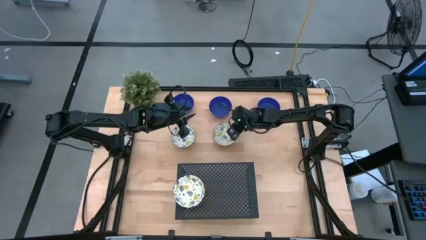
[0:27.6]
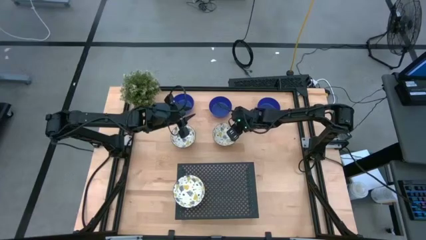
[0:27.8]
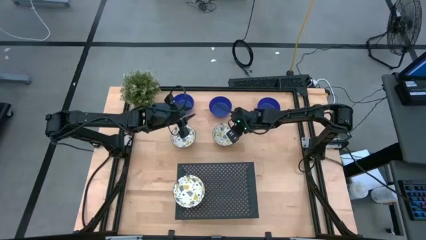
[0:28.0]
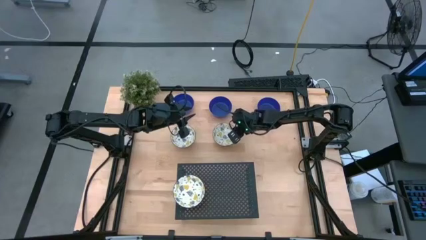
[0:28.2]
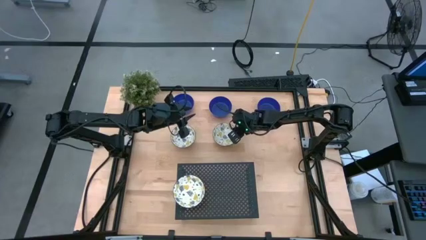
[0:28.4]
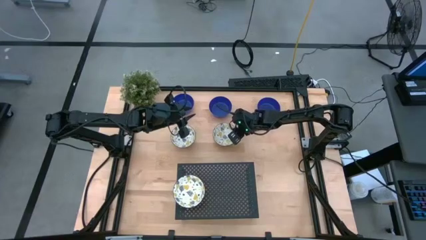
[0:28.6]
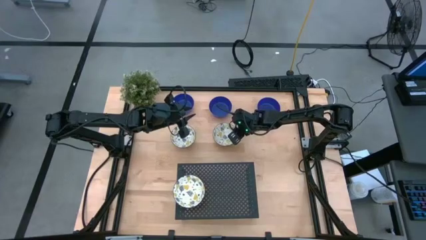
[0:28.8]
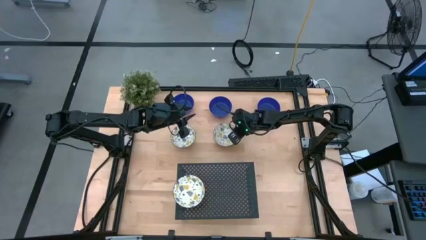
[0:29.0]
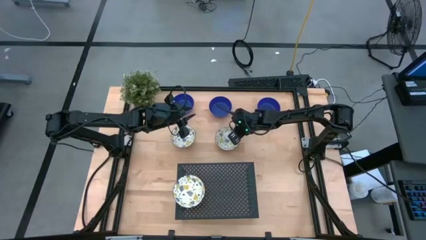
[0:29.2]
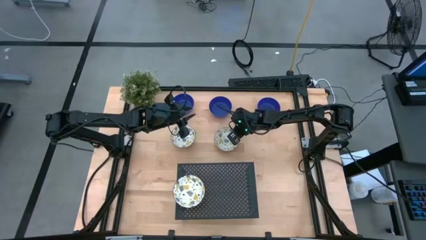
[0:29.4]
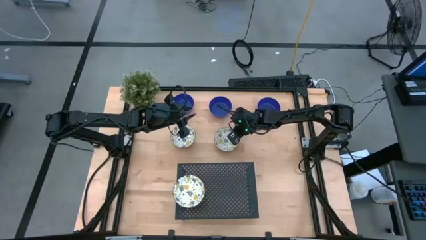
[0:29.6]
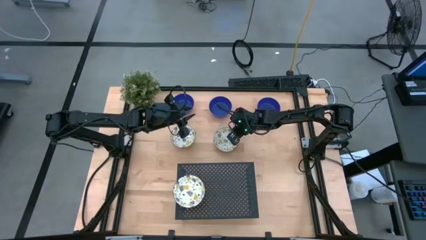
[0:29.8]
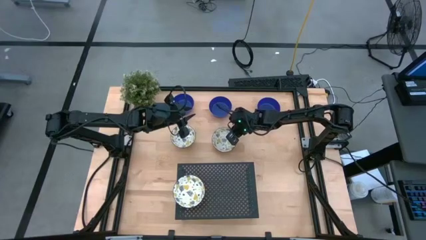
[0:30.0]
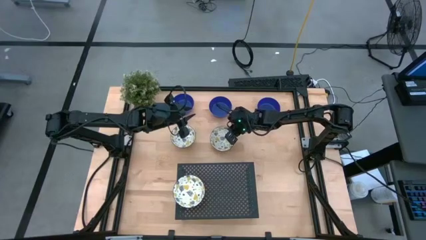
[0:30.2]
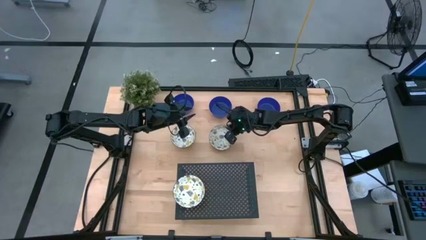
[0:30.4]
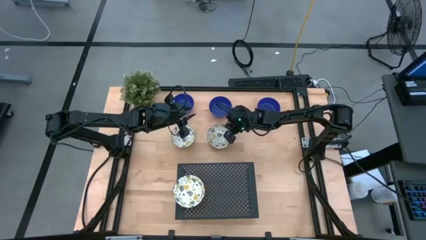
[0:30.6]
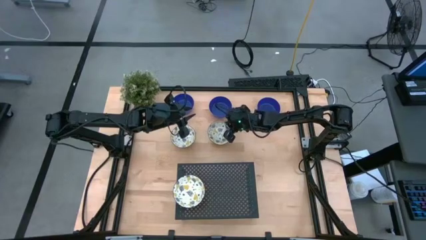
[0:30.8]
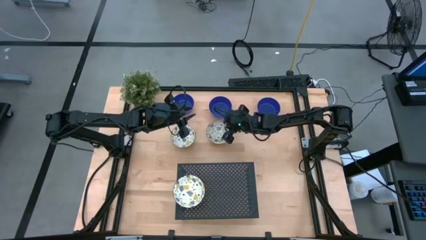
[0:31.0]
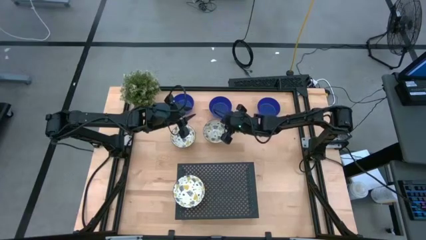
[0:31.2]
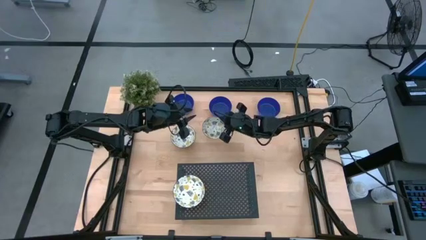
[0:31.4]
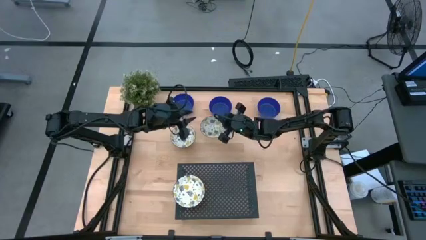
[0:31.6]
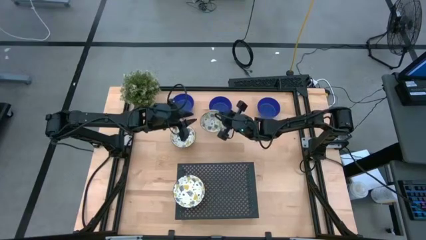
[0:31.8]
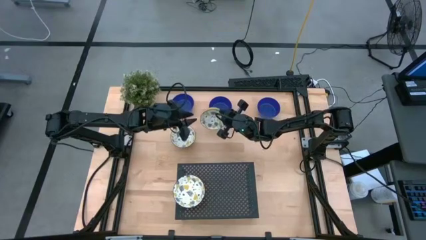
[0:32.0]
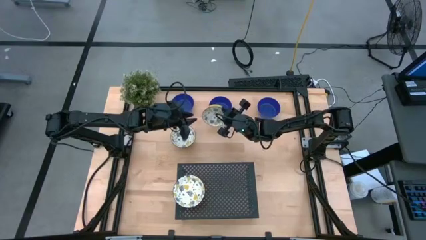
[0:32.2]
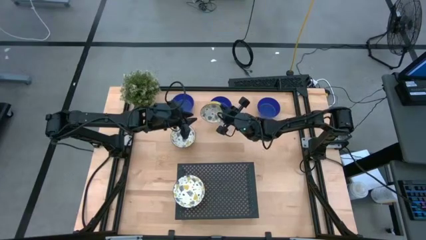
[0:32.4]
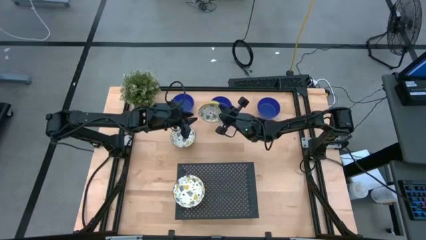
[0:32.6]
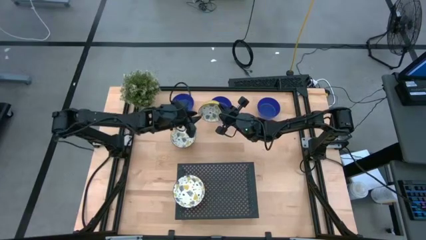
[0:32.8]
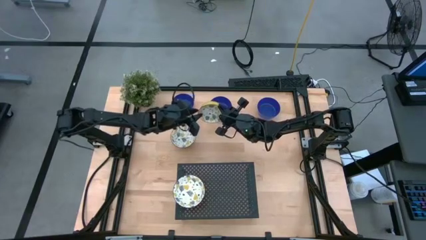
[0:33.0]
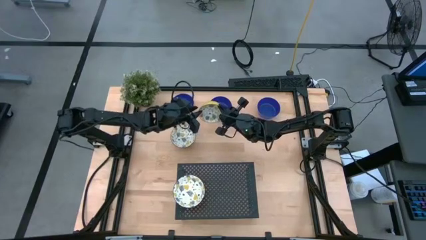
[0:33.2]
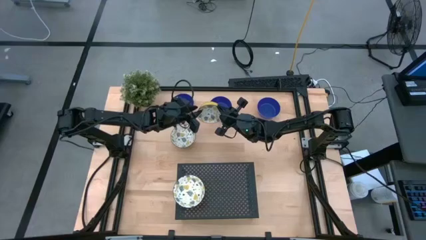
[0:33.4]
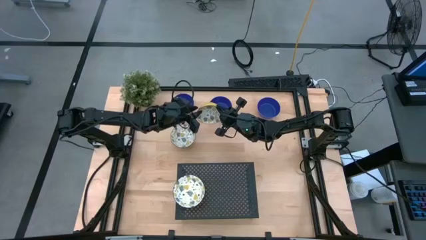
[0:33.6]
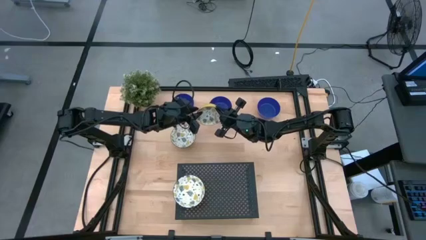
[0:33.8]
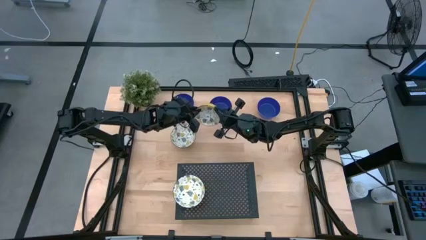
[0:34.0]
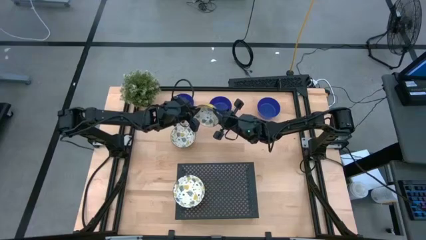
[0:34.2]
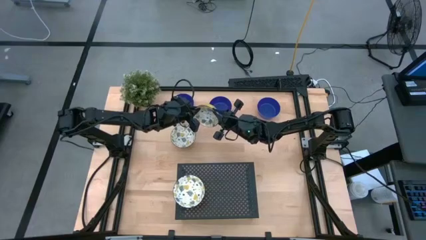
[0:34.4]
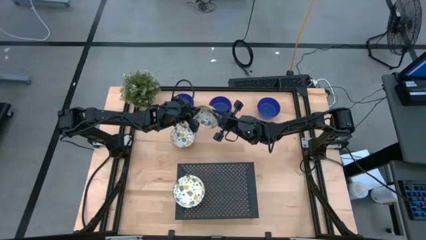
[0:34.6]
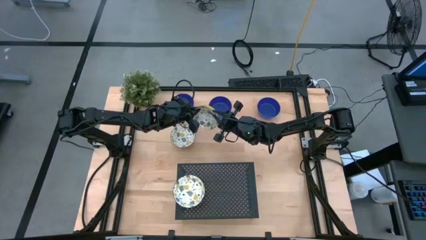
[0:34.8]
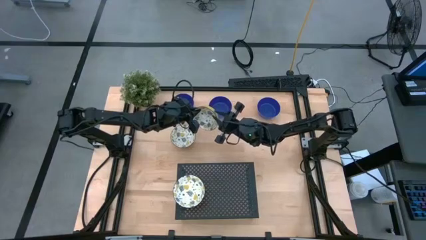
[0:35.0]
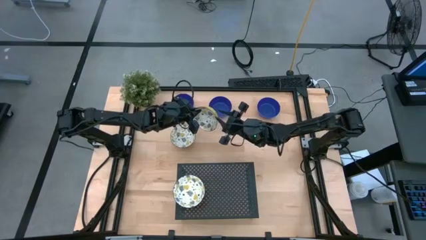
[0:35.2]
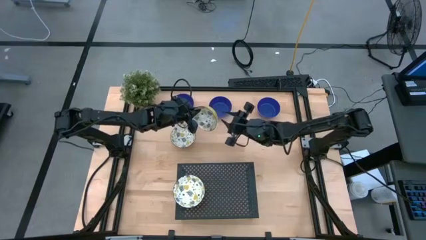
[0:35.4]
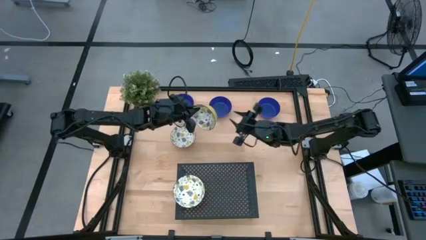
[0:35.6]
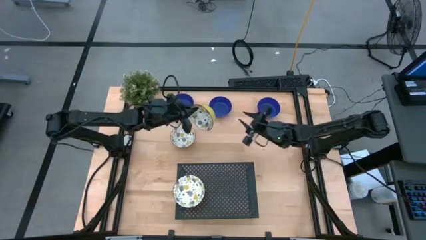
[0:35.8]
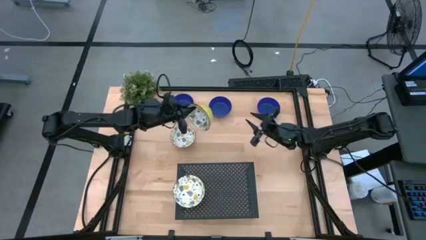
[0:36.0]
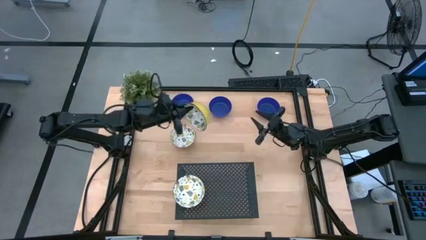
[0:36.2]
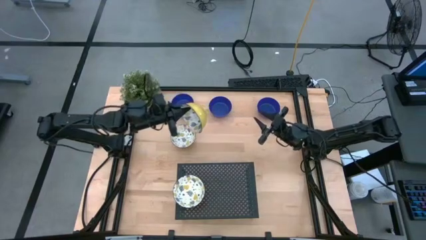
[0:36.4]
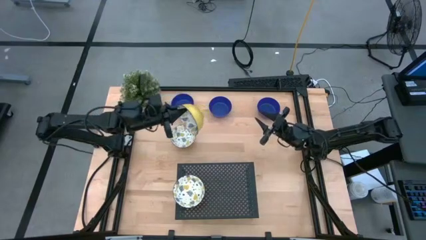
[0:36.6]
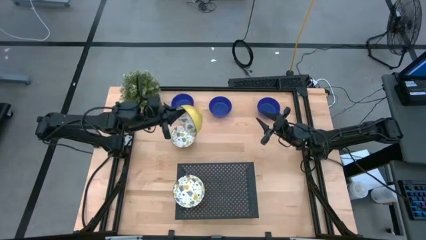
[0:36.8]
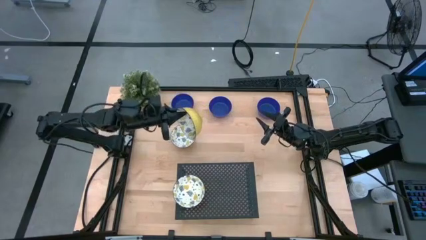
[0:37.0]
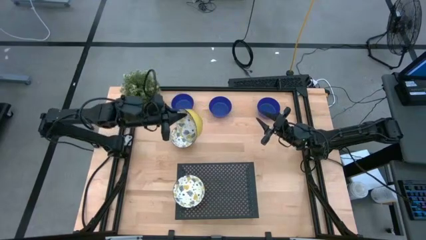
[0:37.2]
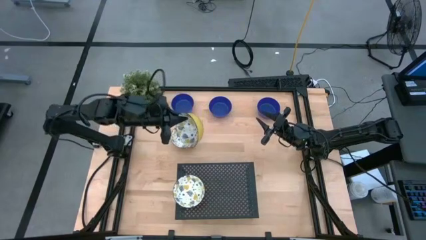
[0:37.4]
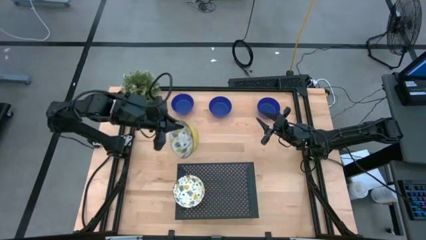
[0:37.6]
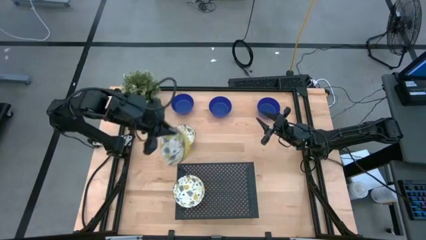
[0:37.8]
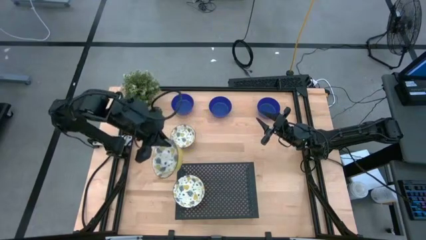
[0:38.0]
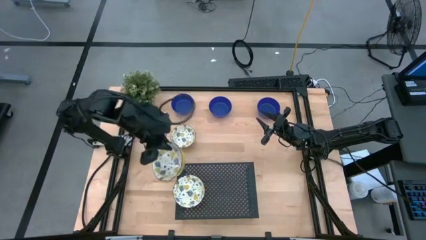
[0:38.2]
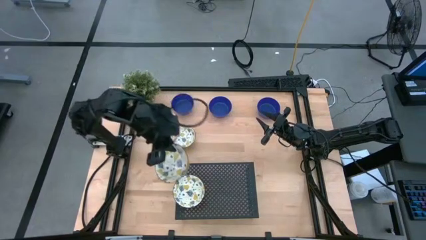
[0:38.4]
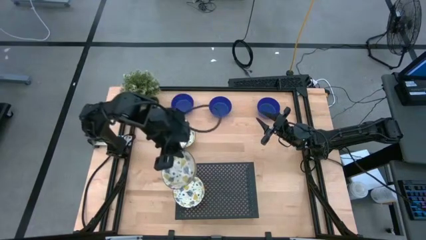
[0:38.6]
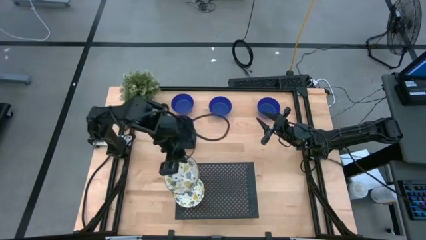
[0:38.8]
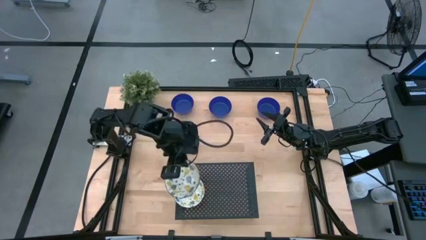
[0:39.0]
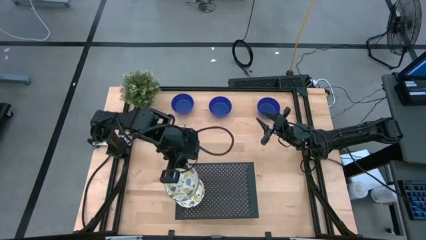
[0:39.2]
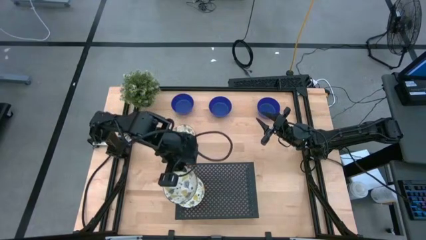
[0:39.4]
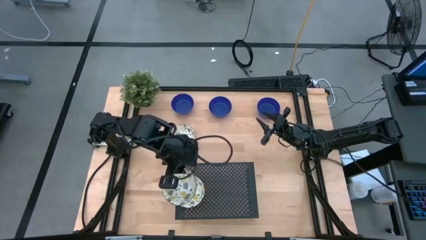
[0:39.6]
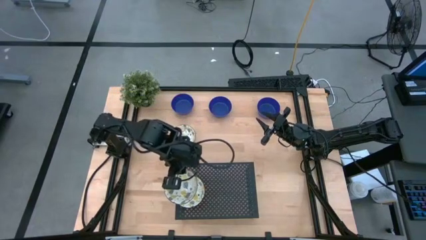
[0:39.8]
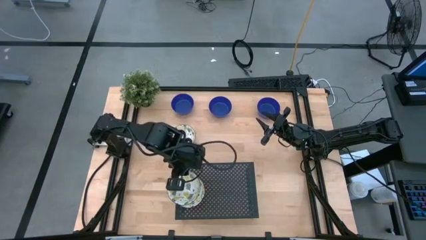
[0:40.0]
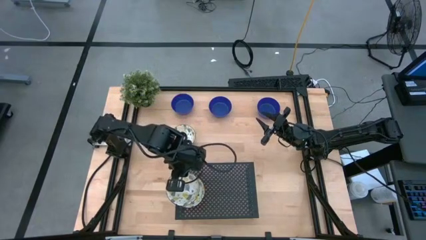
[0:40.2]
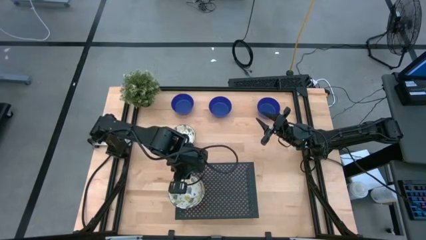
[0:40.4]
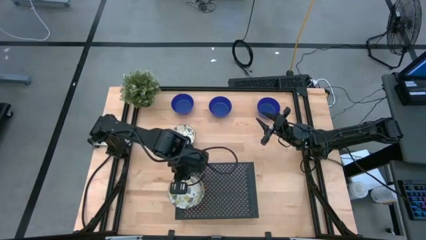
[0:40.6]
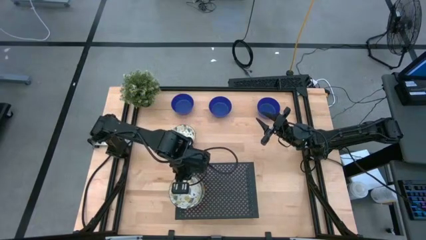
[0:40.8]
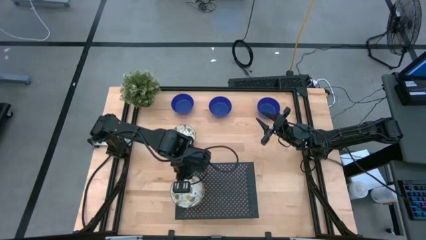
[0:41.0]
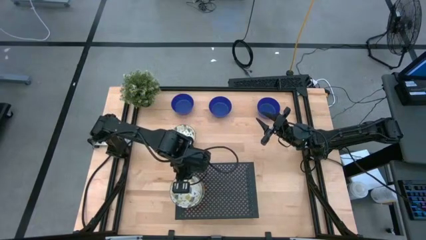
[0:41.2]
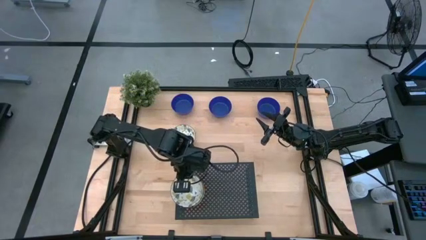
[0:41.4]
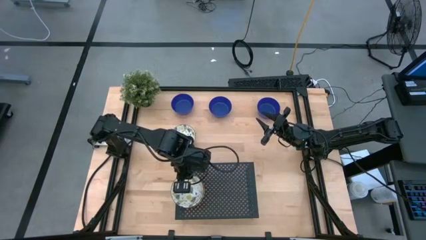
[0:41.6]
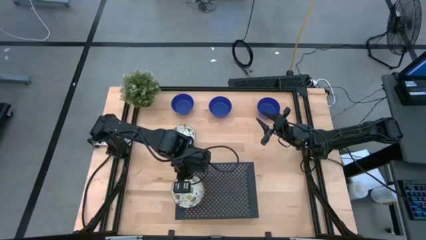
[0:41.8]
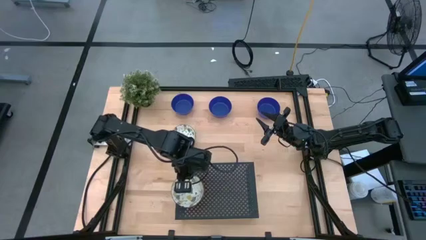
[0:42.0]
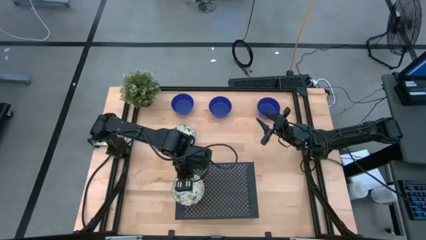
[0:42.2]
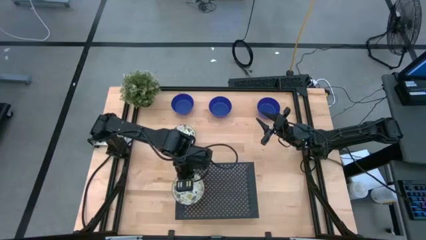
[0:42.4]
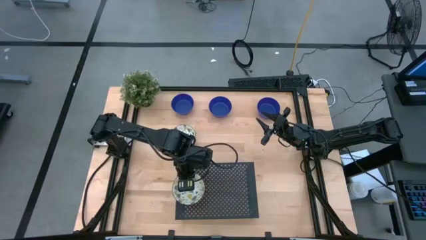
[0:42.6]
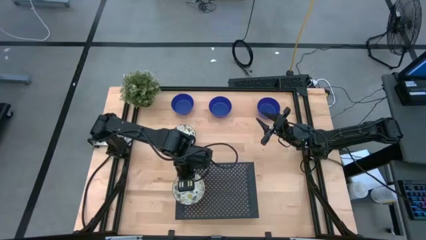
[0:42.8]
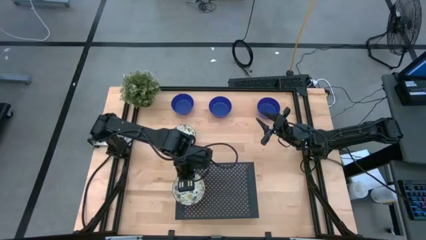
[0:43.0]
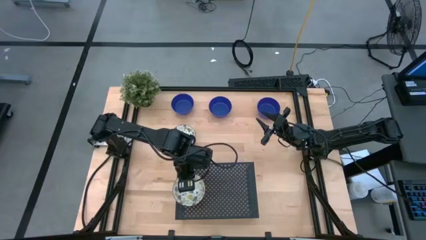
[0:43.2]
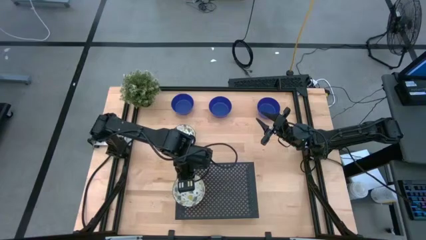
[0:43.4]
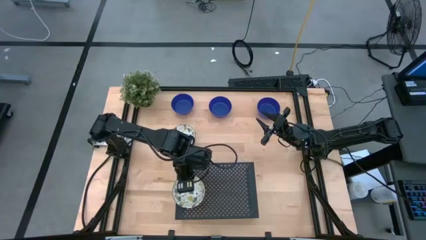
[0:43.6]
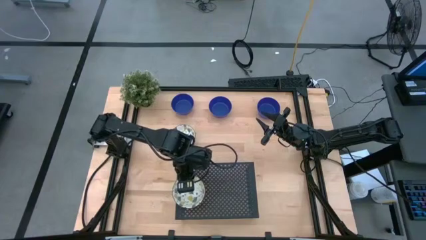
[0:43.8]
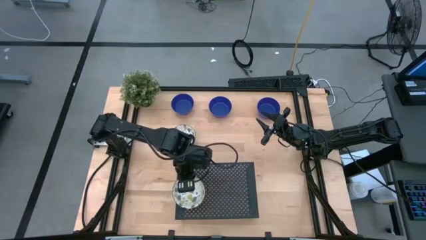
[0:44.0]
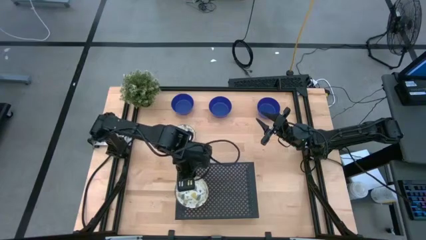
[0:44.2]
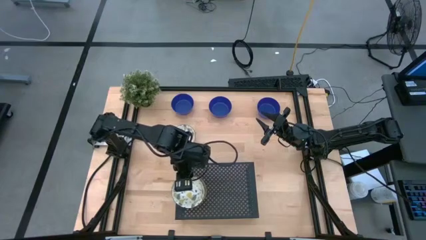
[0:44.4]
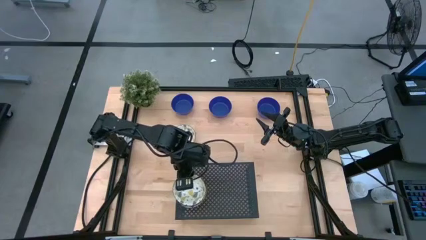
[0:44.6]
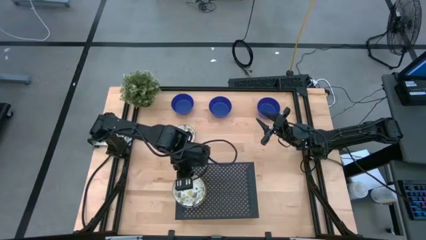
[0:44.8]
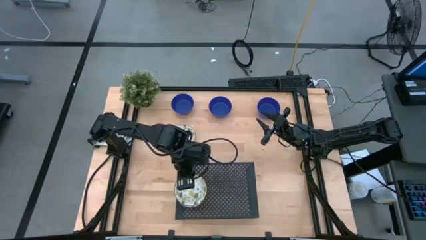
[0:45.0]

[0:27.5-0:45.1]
Task: Pick & Place Mini bowls
Stack the right patterned yellow bowl on the patterned yellow bowl on the shelf
